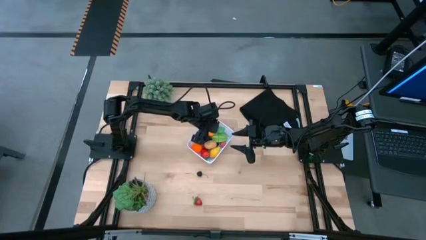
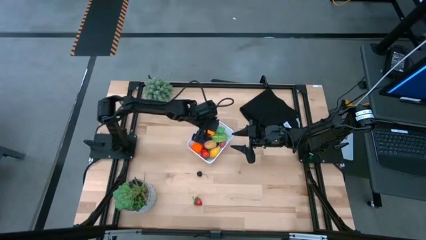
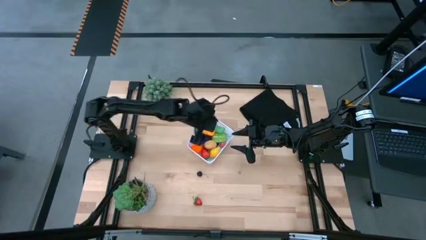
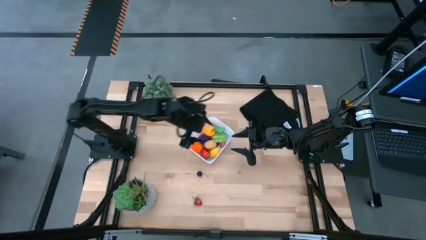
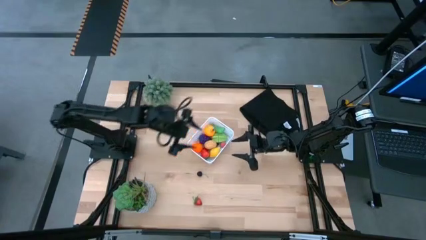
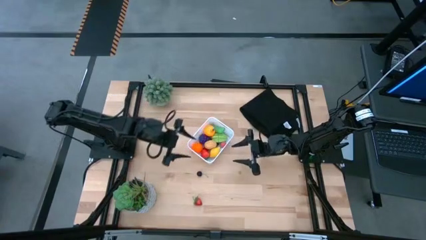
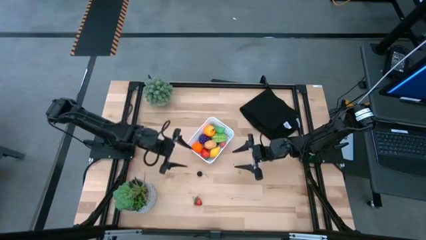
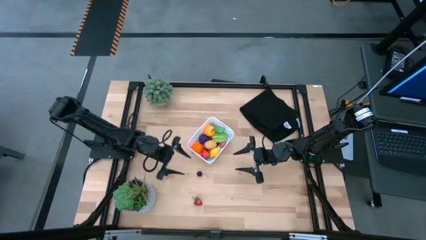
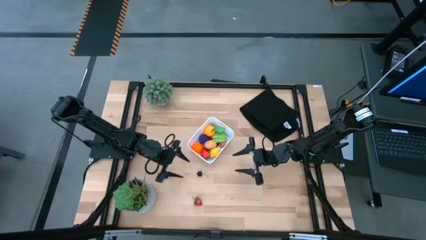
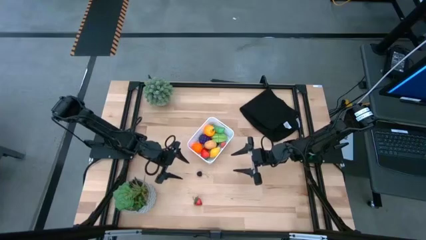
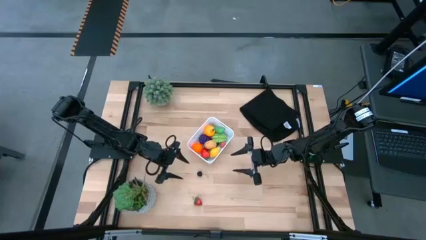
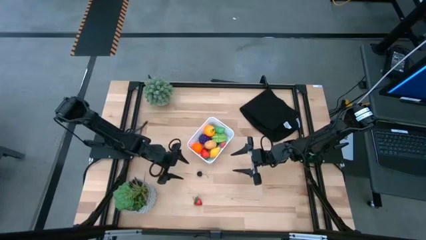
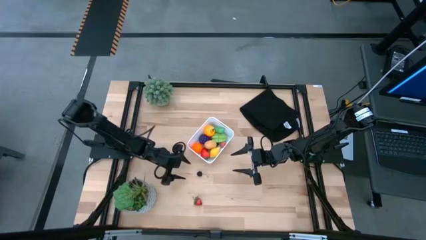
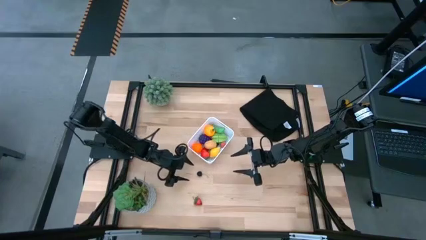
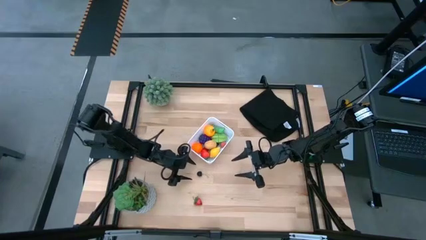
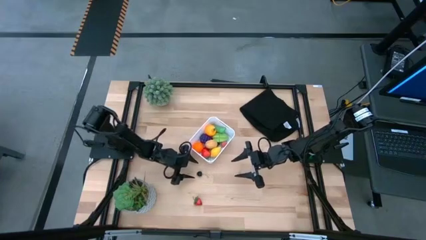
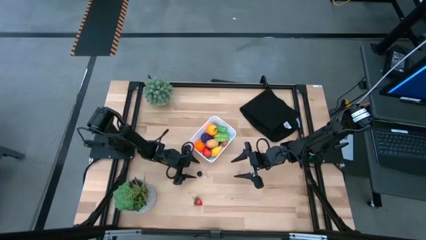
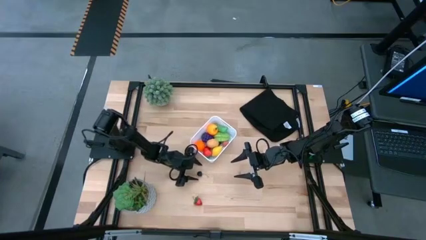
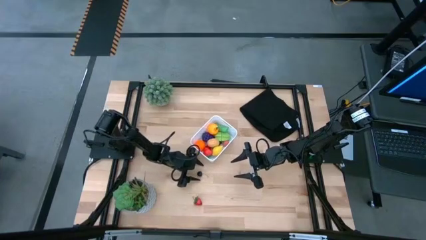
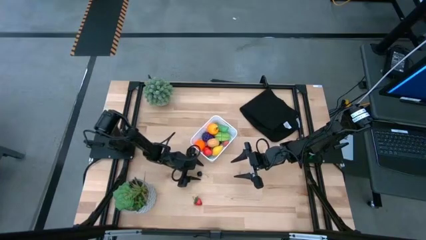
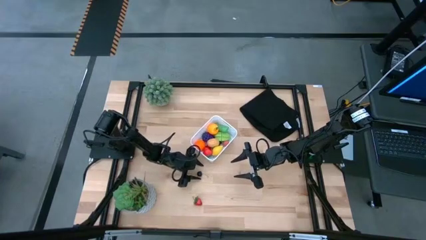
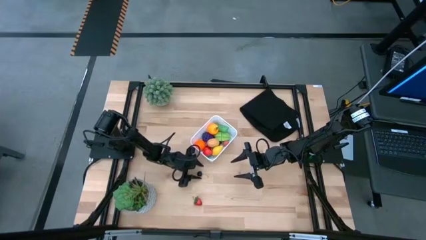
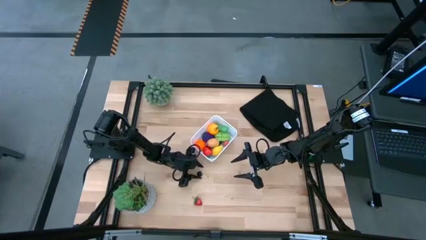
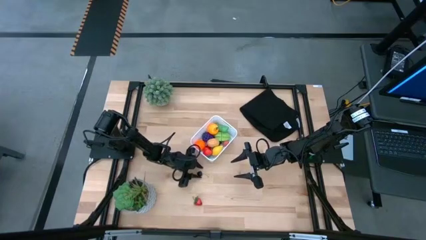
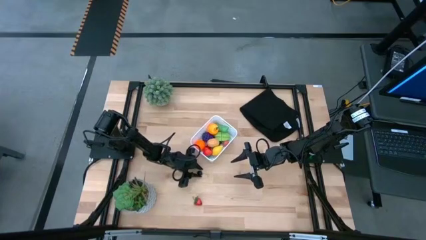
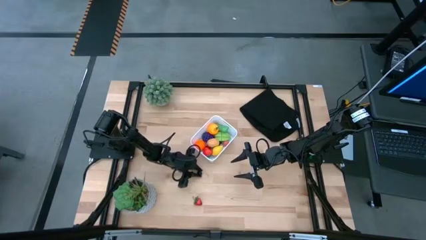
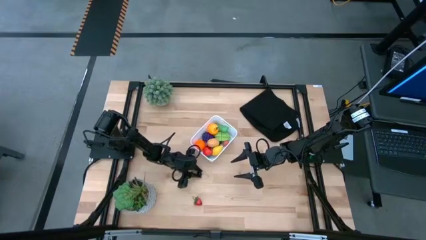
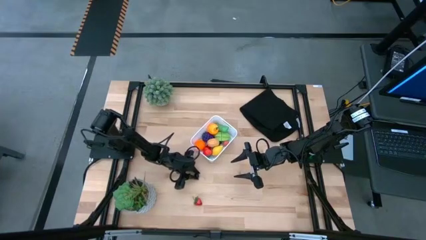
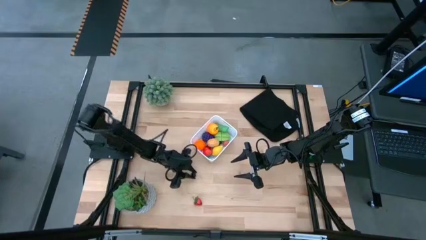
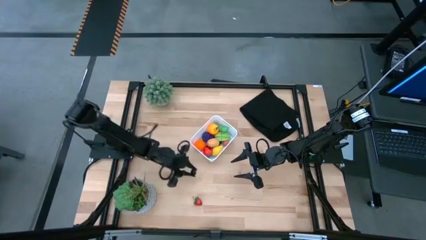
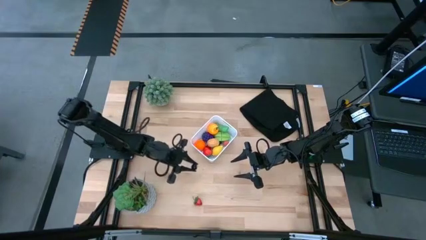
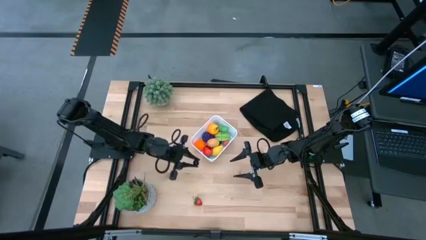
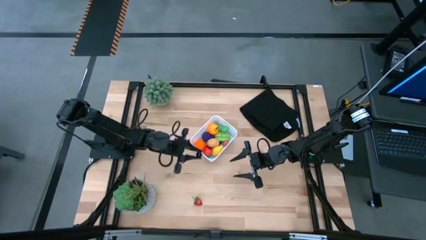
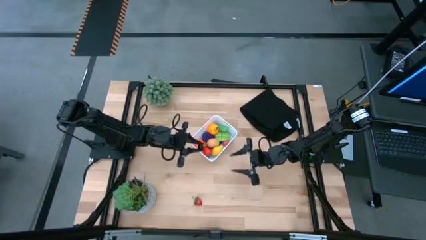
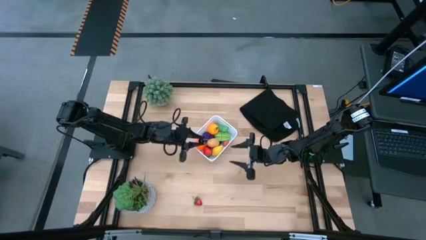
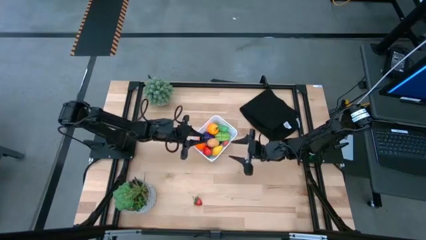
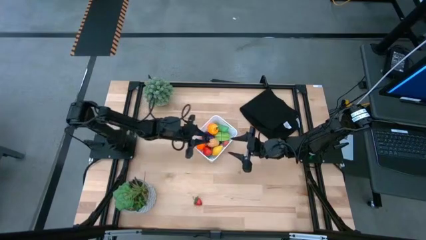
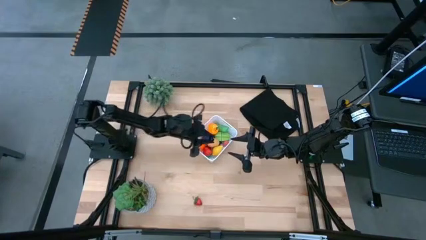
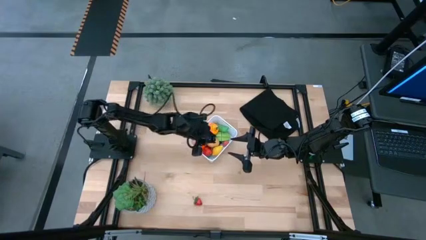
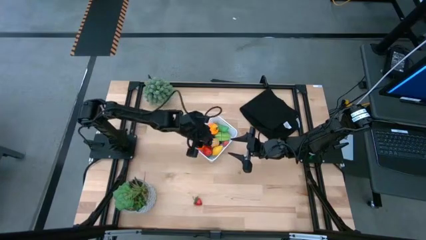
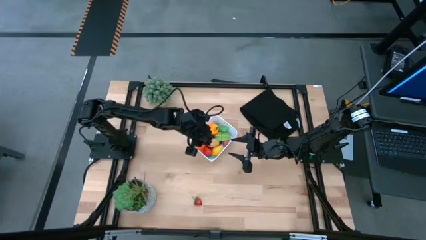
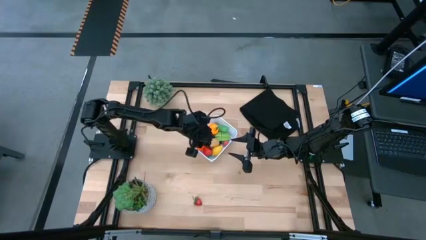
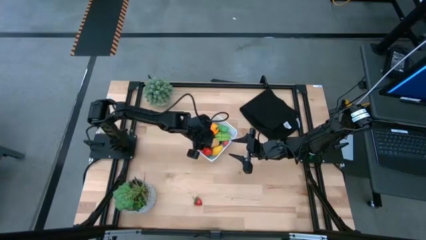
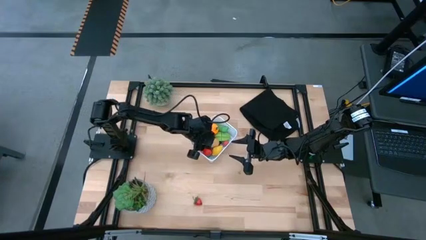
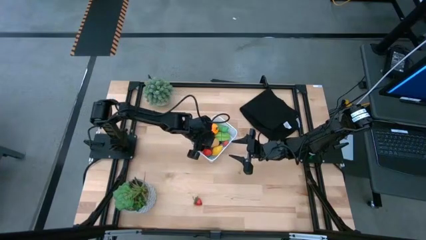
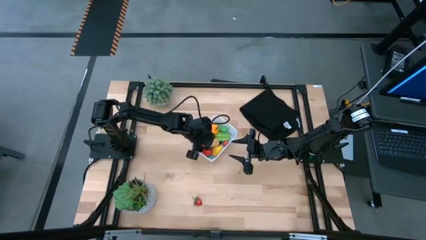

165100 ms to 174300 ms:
Task: Pick and placing Produce into tupperware
Put the black cherry into the white bin

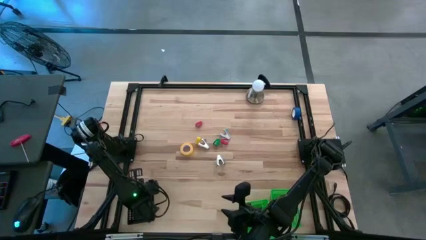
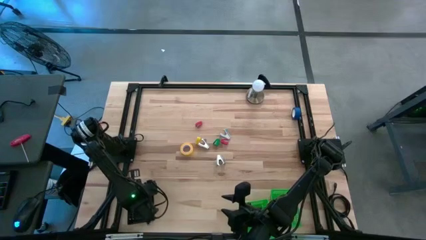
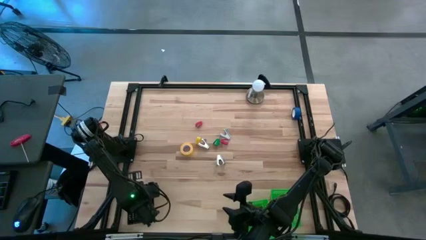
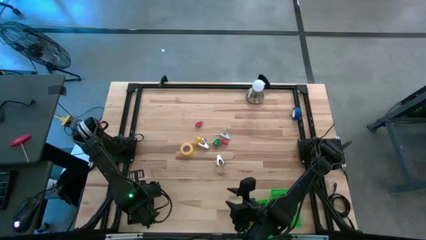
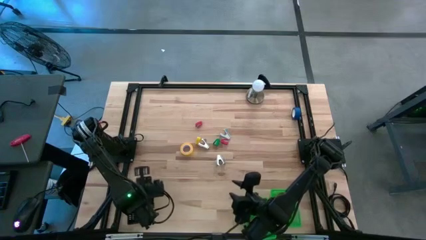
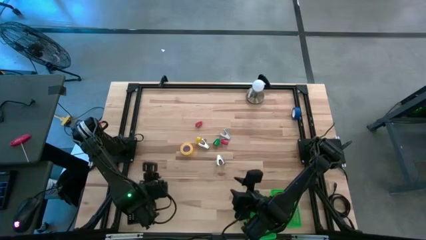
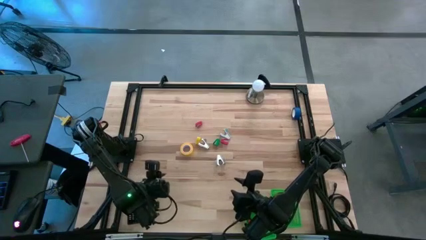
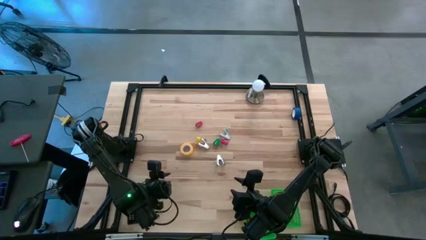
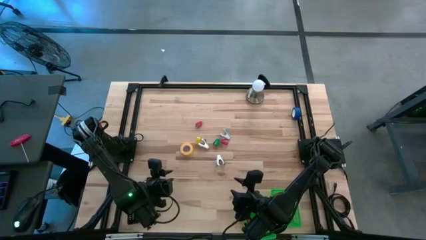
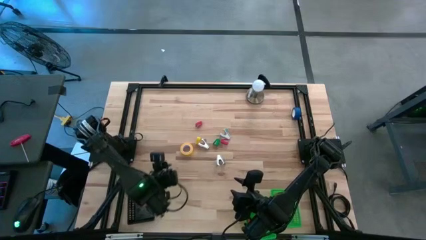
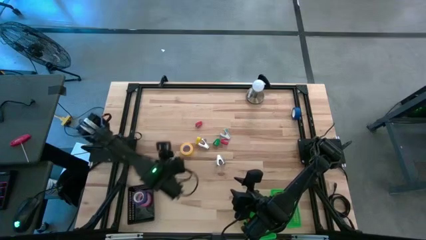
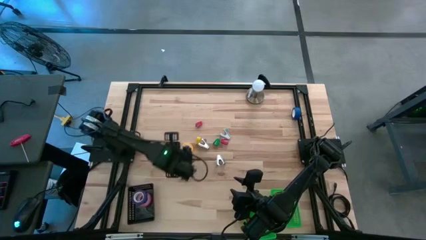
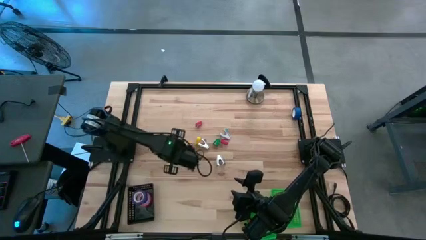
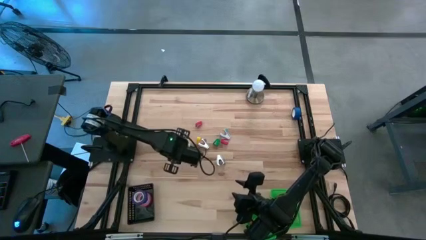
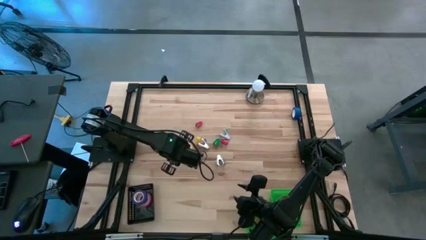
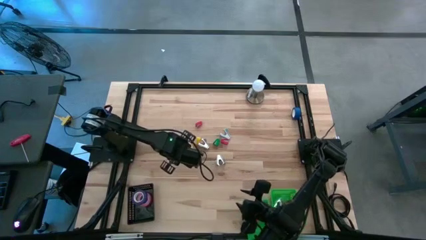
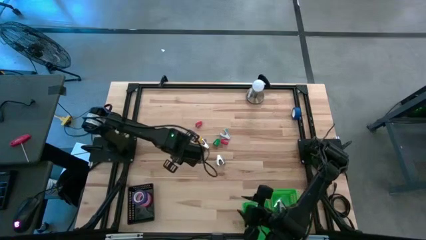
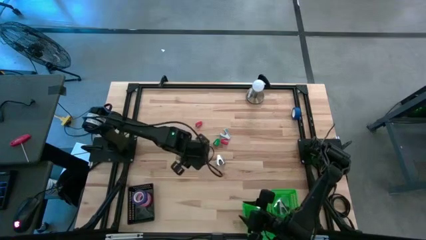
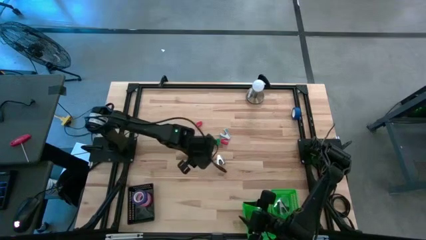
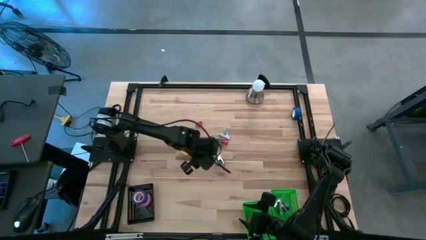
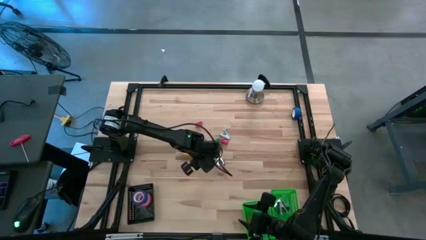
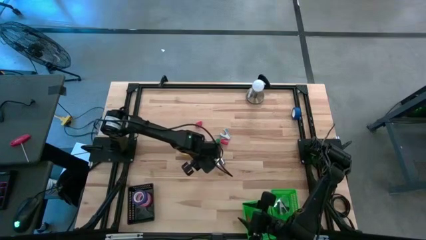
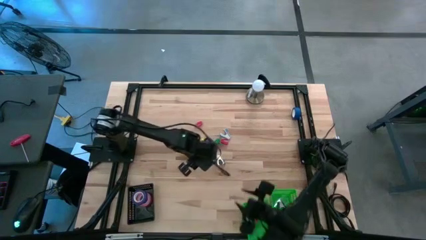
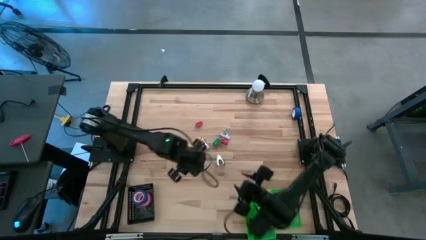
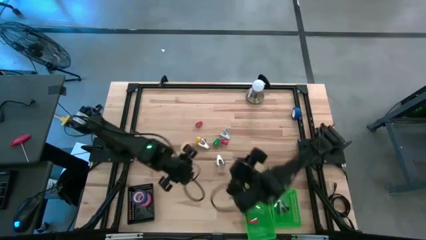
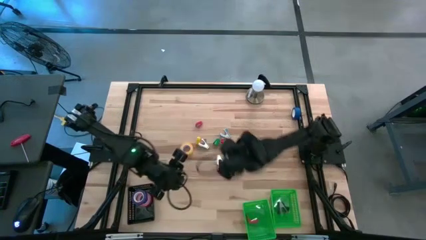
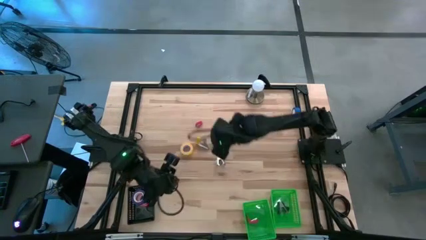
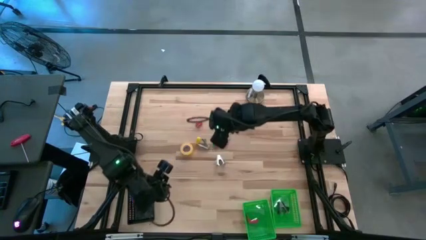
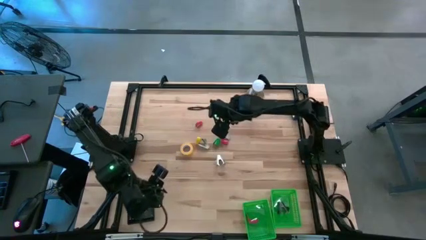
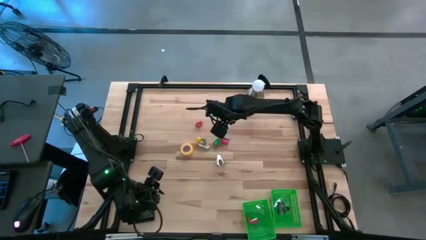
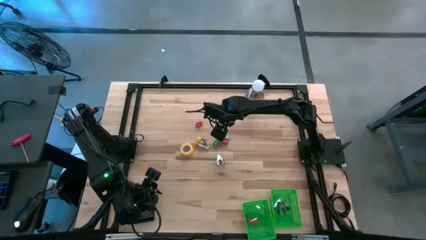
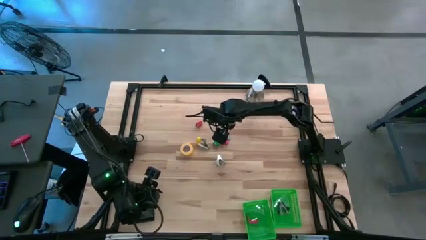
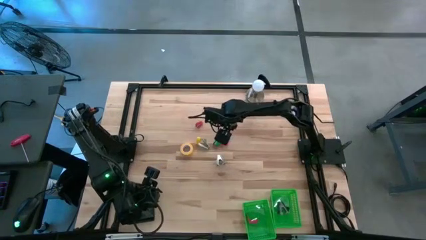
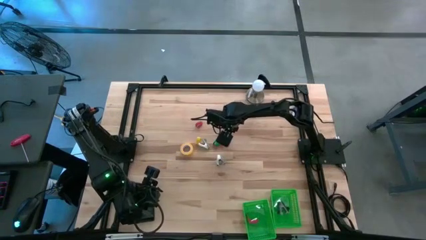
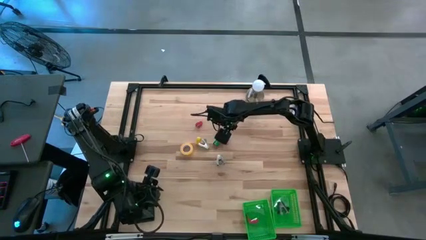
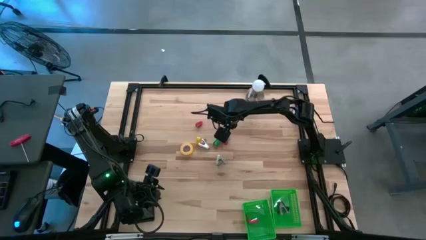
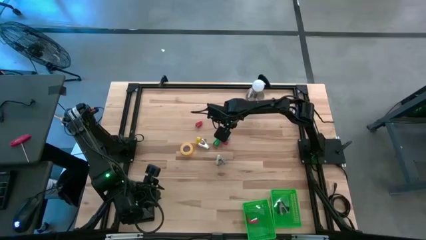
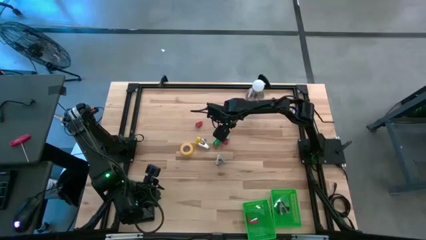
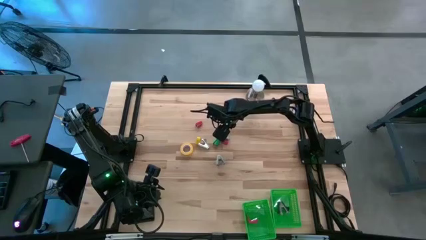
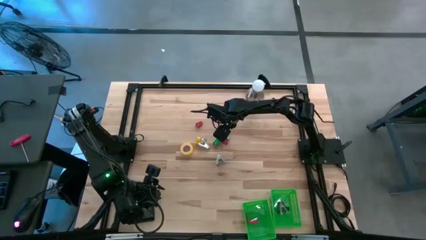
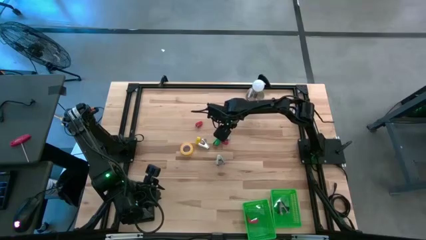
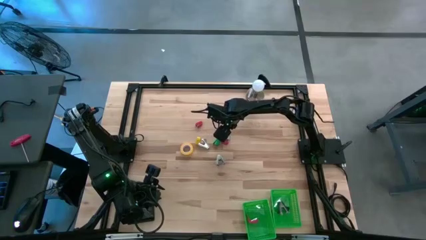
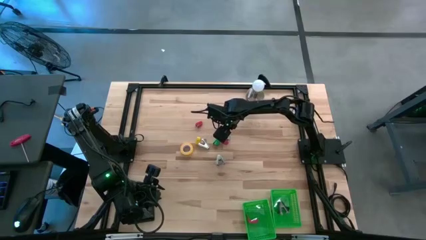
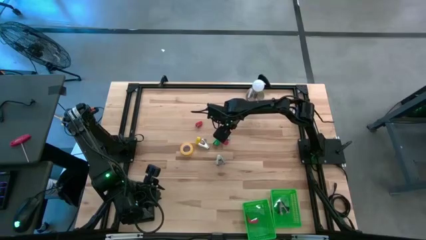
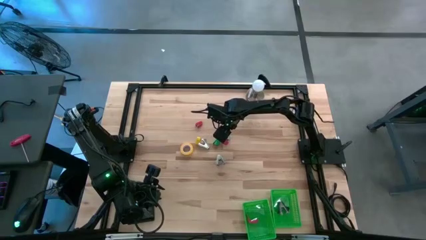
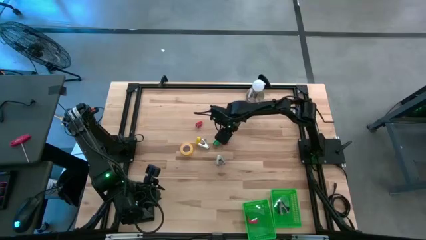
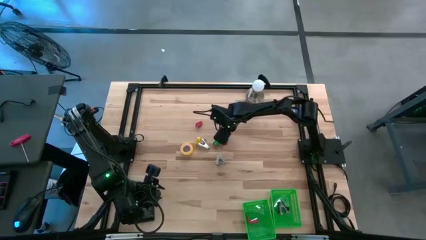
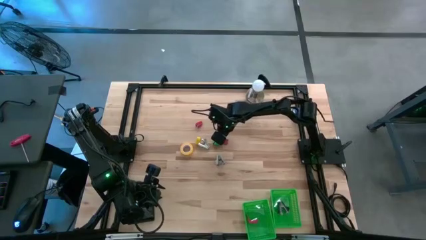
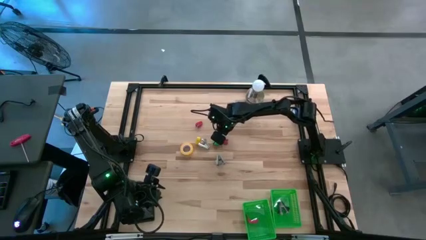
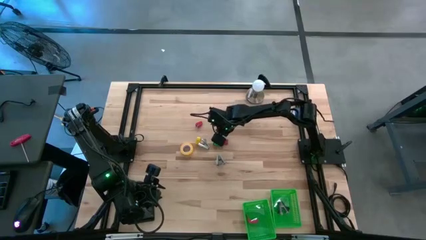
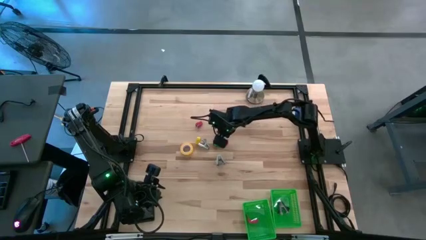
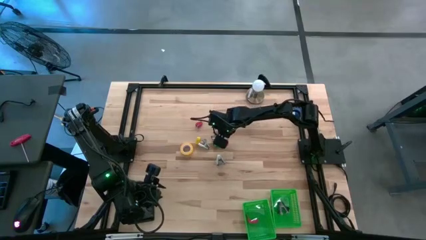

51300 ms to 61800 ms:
Task: Pick and place Stapler, Stapler remover, tape
Put the blue staple remover into the right green bin
